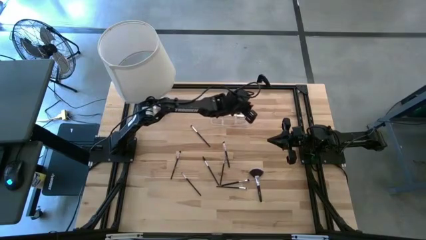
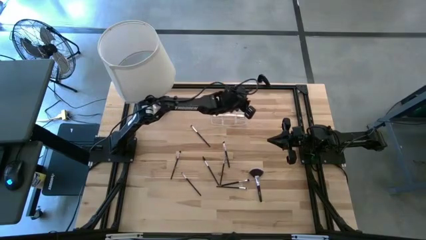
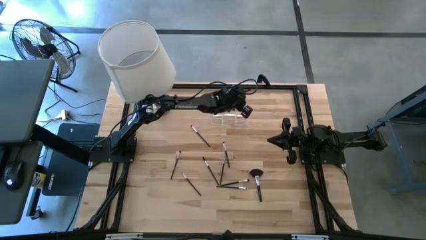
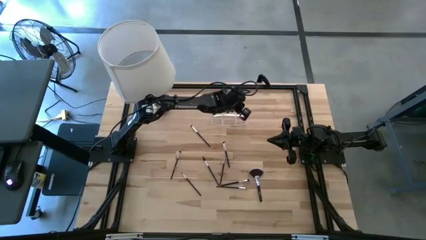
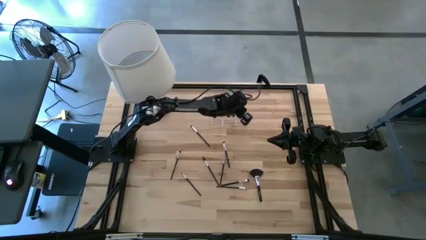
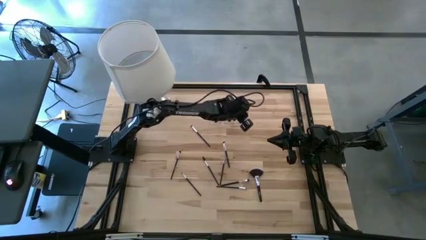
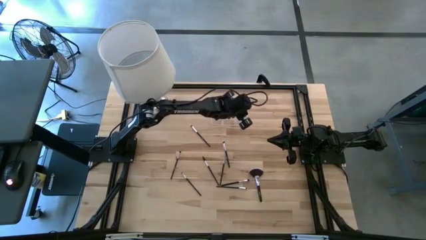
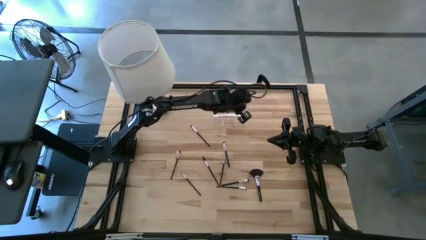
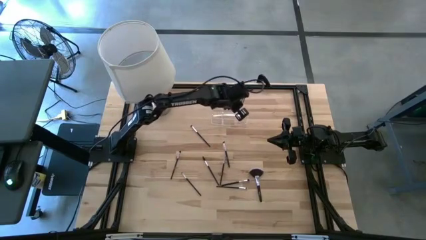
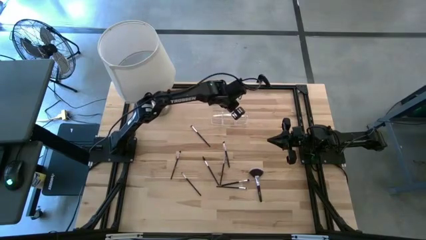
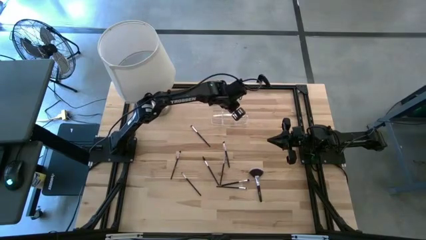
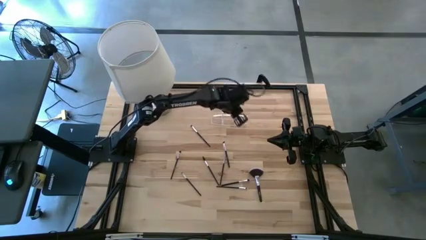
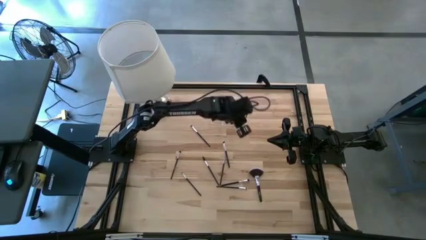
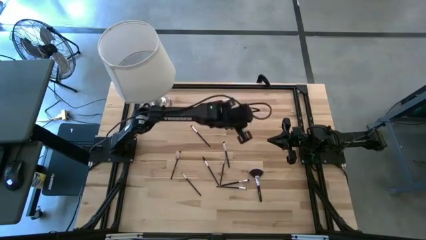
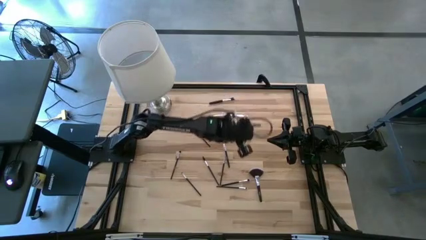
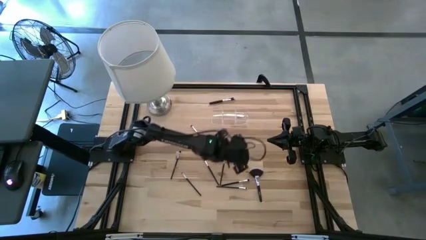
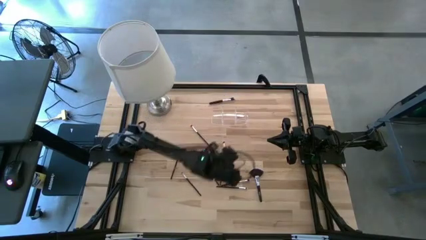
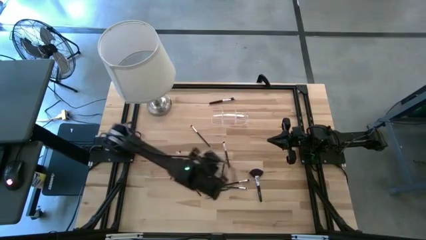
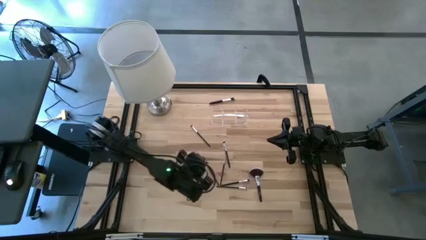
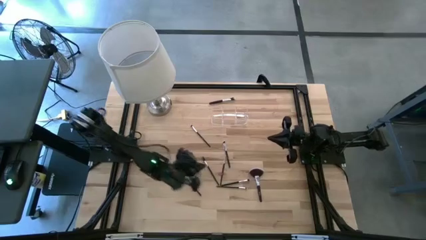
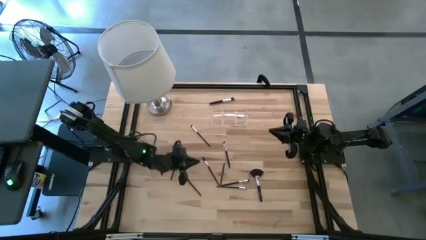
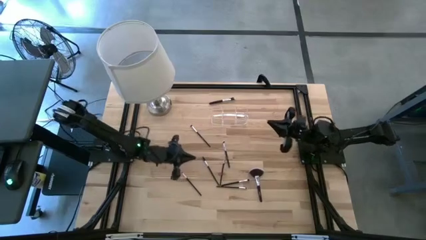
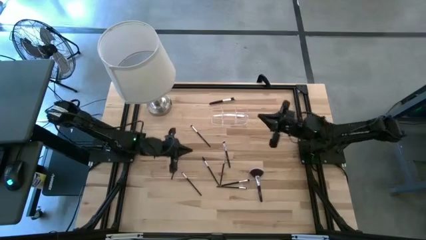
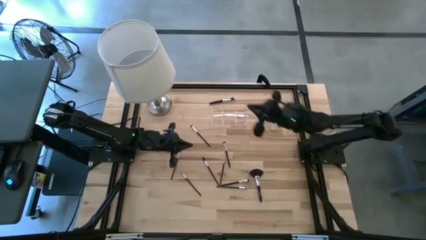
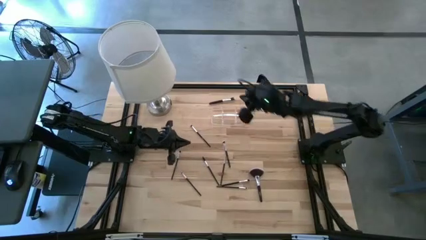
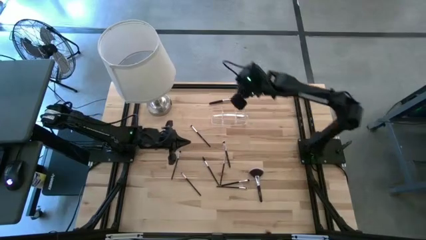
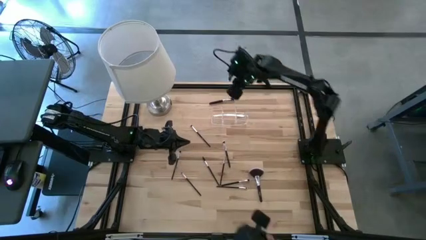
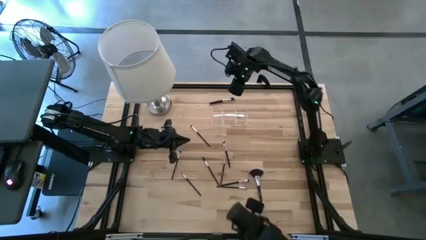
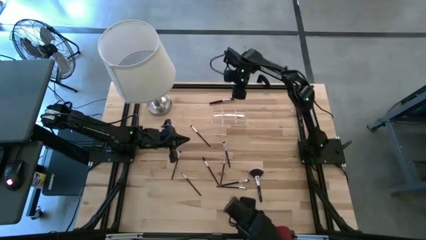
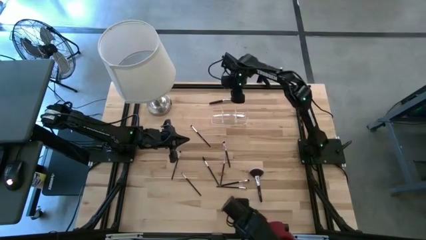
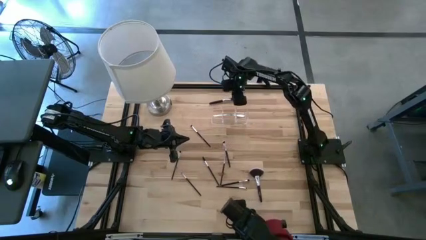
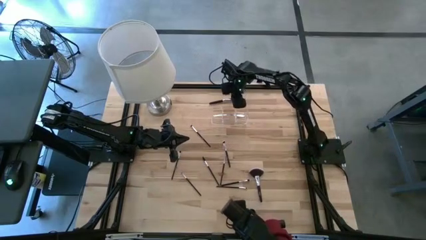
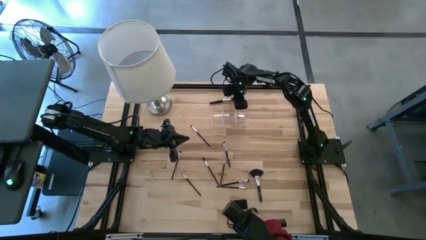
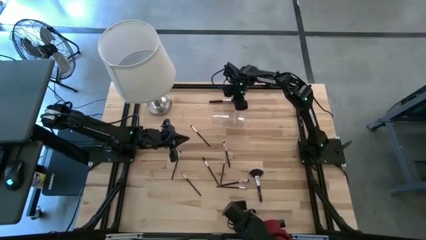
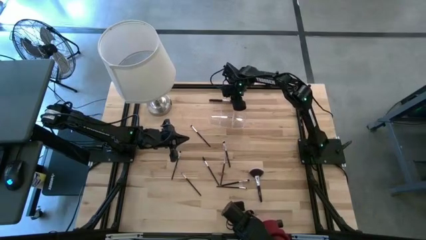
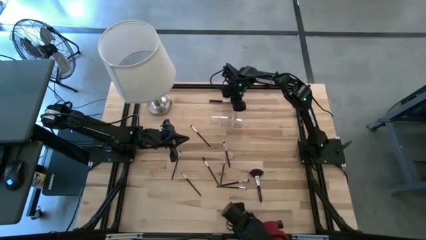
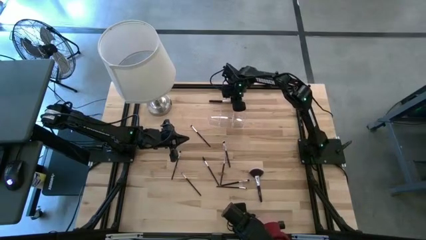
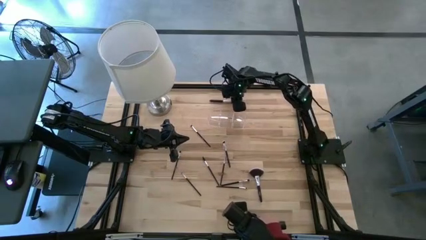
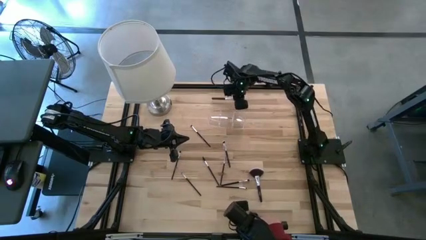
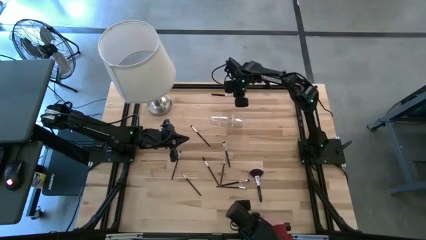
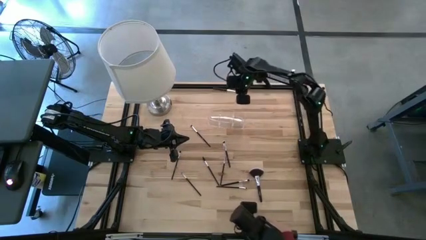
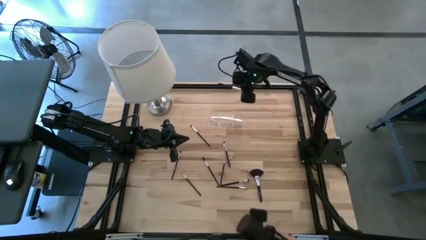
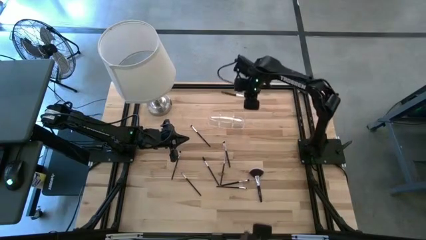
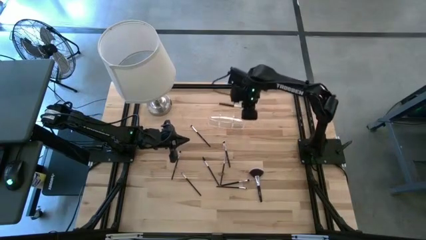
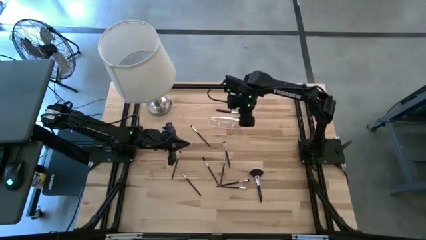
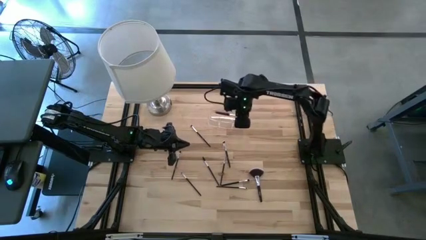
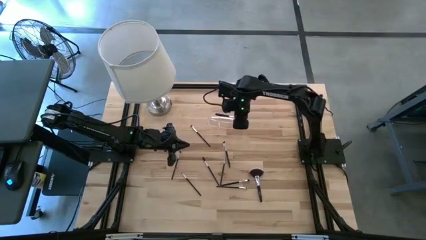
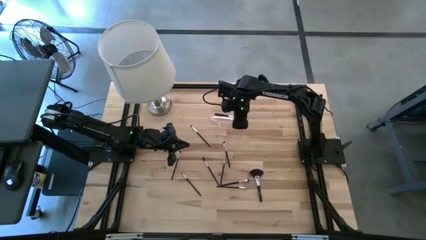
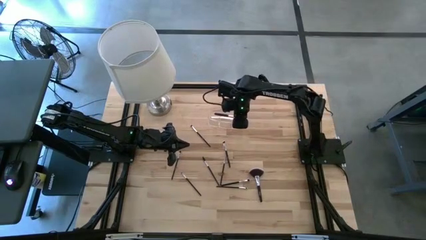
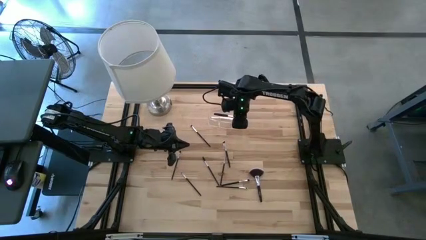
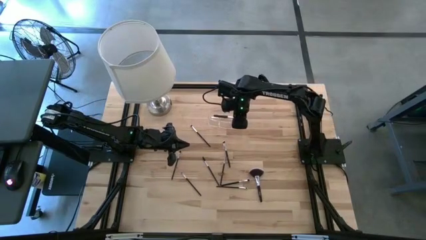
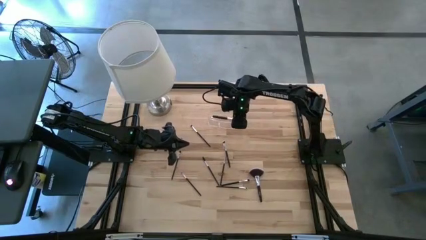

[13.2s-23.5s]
Task: Put items in baskets/containers
Put the foundation brush into the transparent organizer
